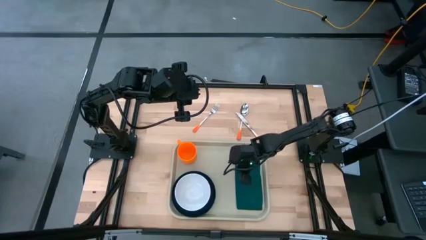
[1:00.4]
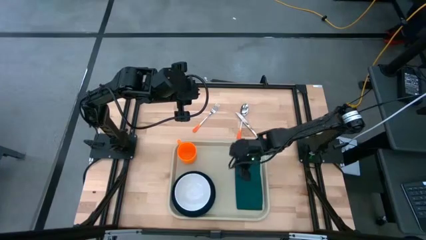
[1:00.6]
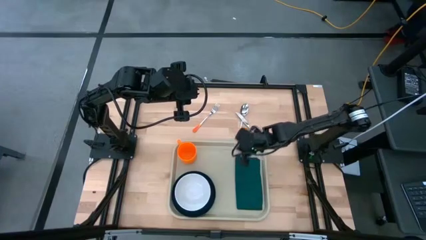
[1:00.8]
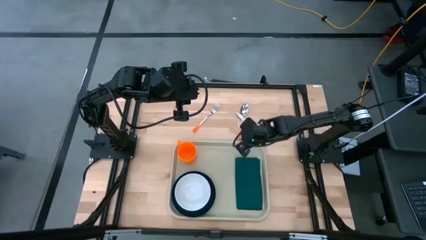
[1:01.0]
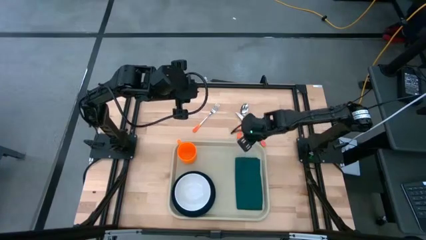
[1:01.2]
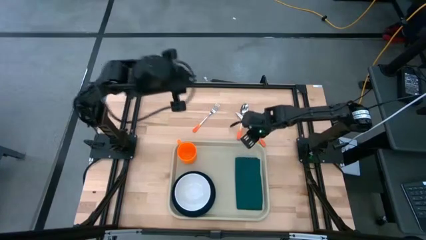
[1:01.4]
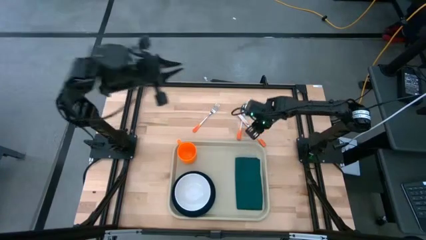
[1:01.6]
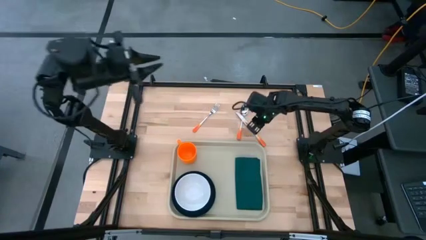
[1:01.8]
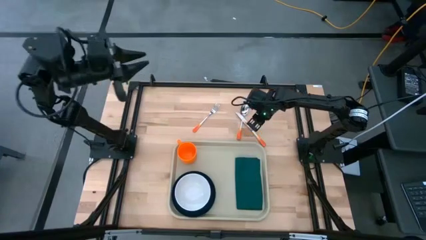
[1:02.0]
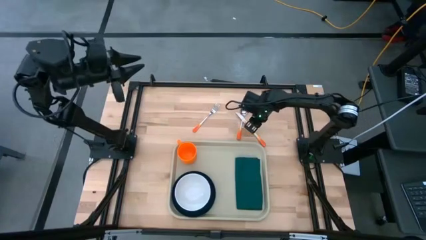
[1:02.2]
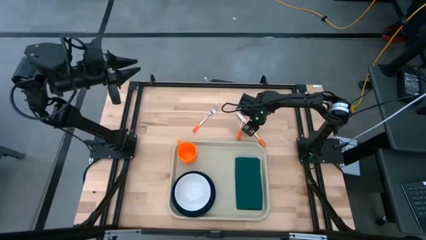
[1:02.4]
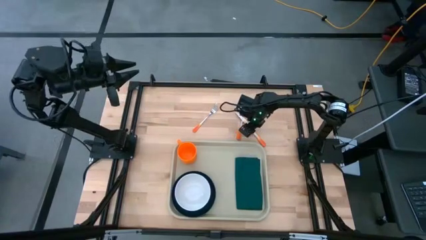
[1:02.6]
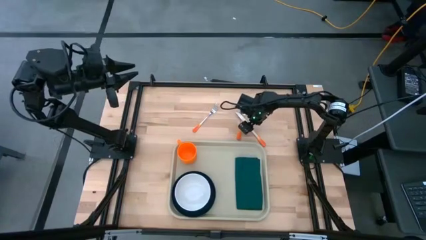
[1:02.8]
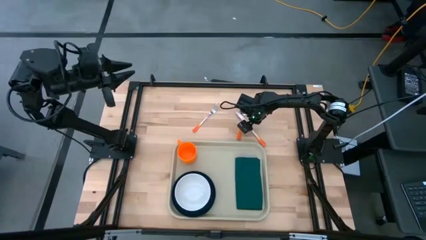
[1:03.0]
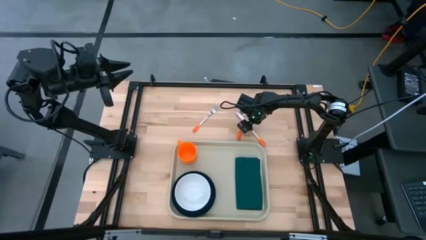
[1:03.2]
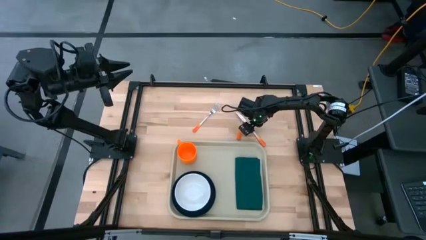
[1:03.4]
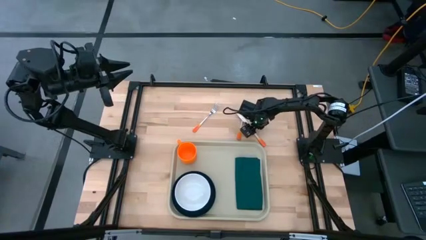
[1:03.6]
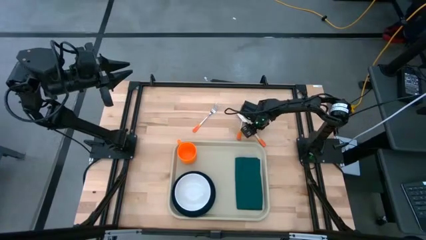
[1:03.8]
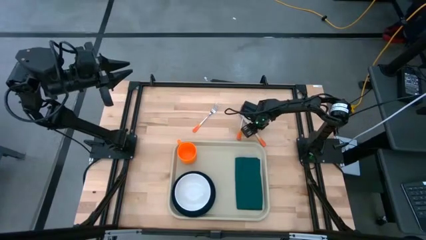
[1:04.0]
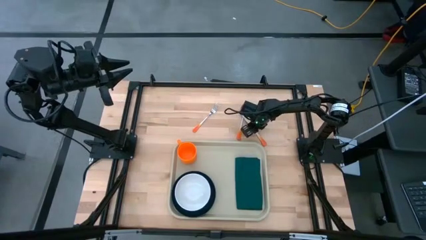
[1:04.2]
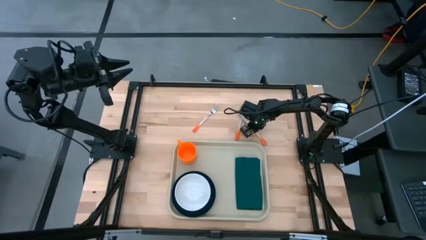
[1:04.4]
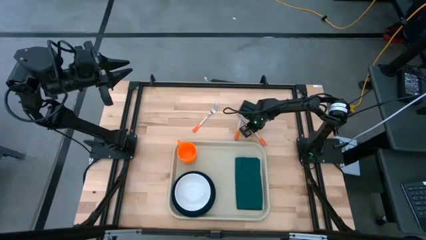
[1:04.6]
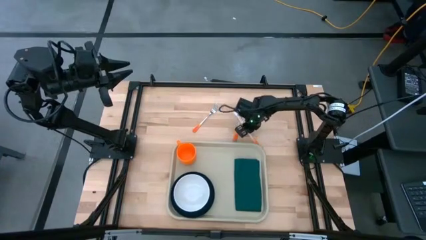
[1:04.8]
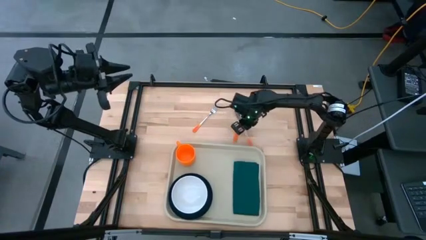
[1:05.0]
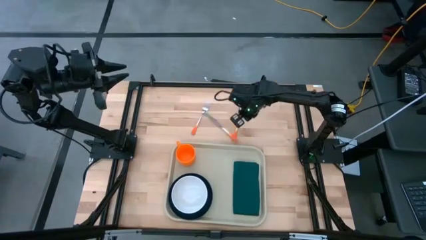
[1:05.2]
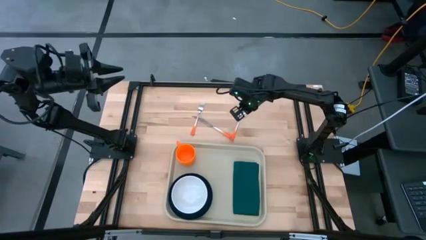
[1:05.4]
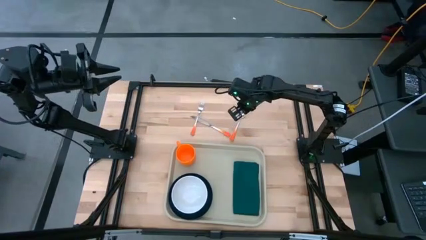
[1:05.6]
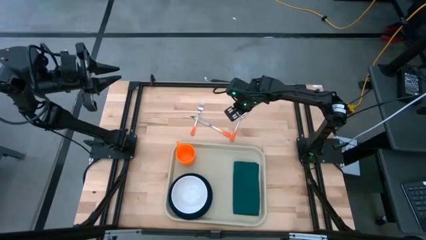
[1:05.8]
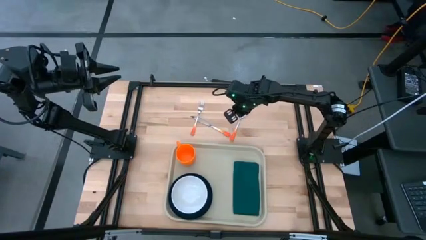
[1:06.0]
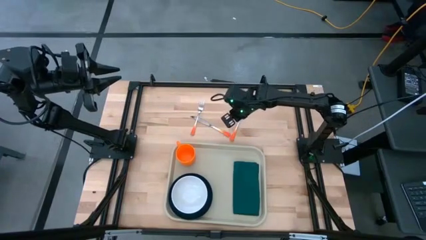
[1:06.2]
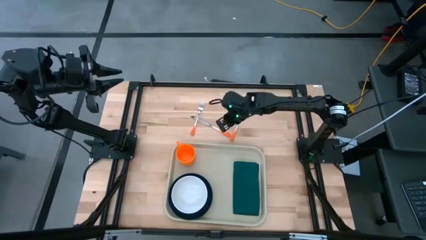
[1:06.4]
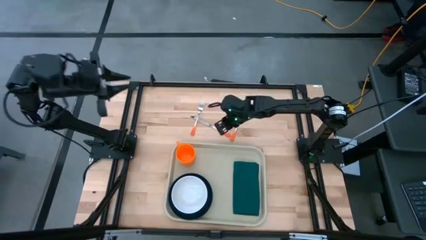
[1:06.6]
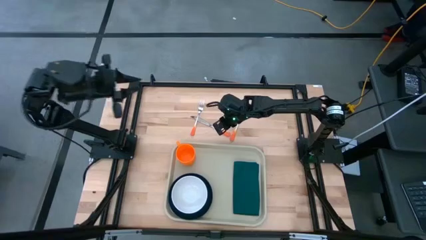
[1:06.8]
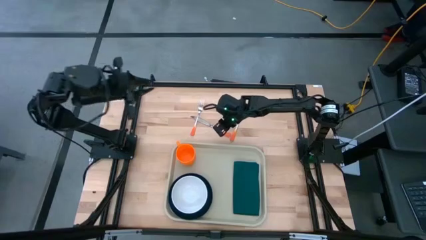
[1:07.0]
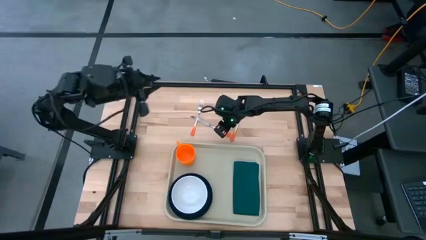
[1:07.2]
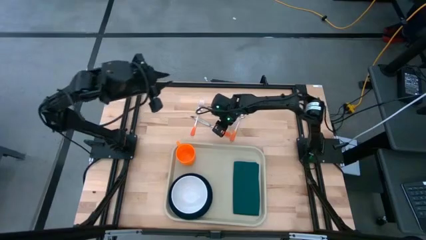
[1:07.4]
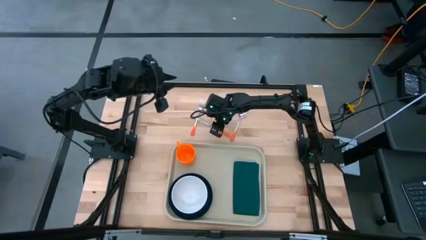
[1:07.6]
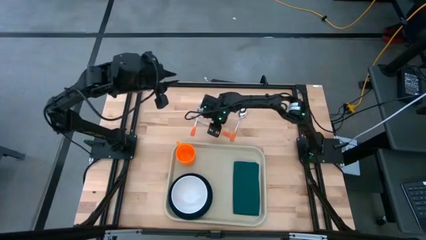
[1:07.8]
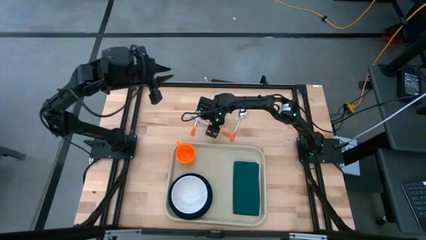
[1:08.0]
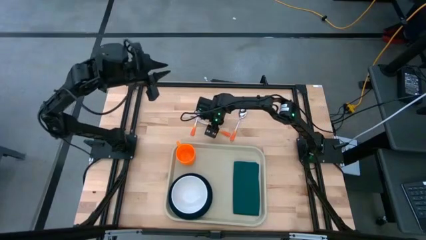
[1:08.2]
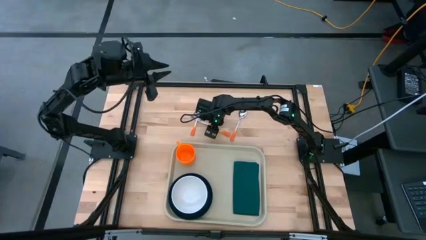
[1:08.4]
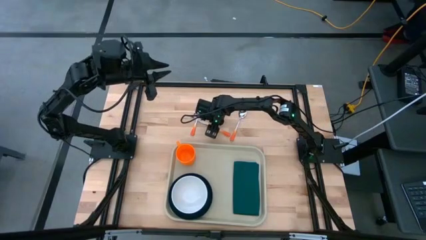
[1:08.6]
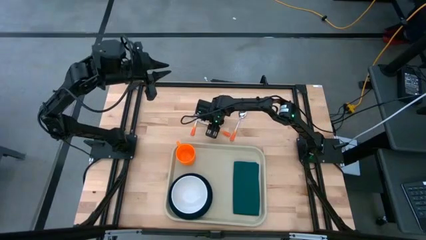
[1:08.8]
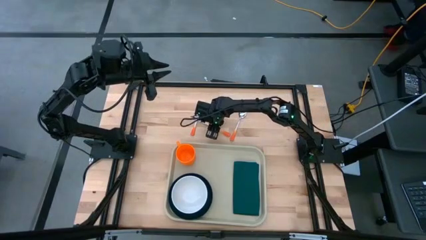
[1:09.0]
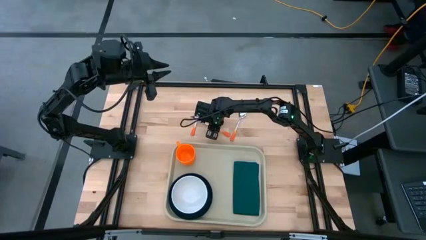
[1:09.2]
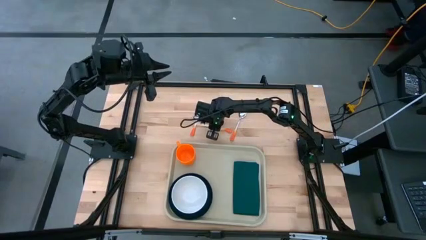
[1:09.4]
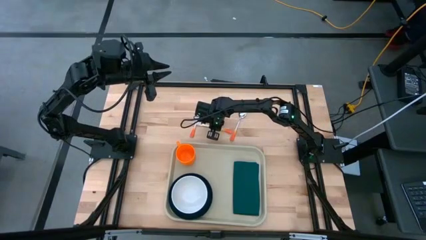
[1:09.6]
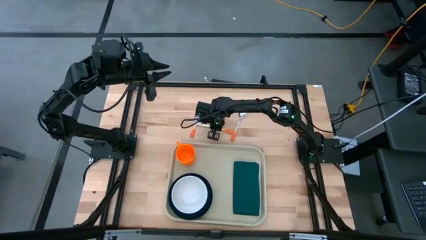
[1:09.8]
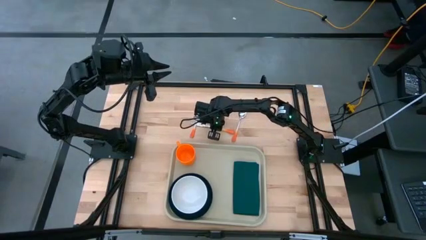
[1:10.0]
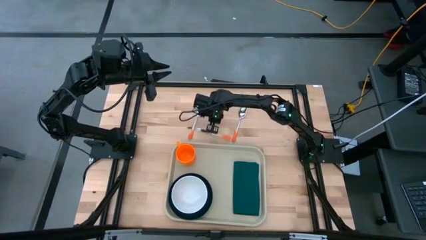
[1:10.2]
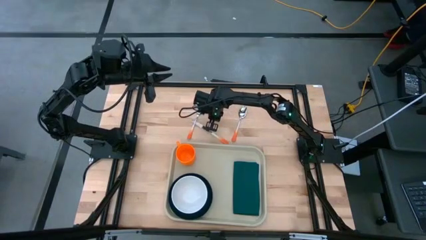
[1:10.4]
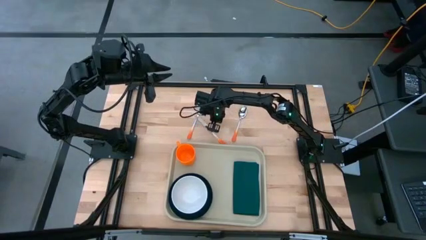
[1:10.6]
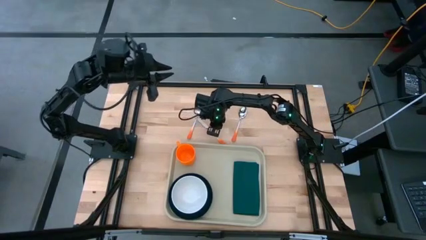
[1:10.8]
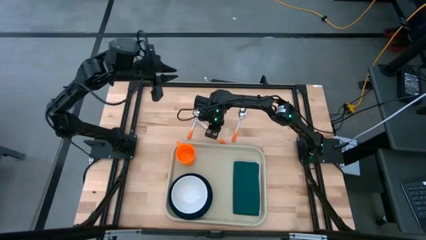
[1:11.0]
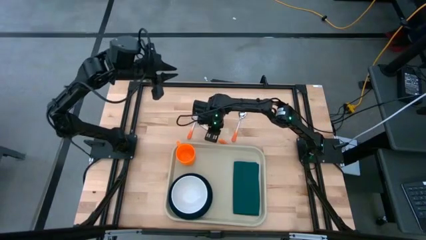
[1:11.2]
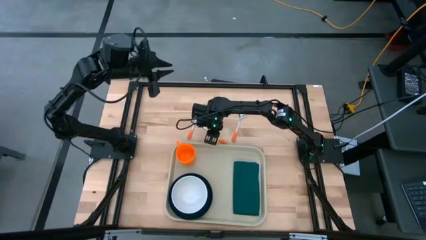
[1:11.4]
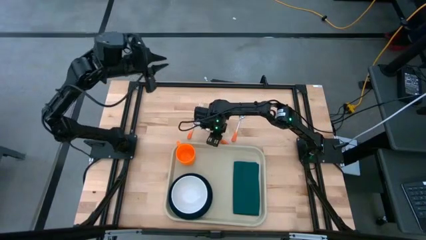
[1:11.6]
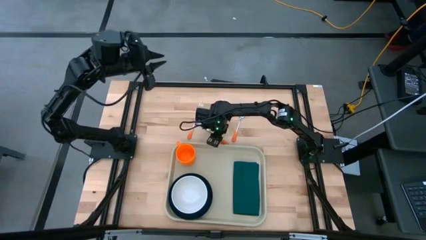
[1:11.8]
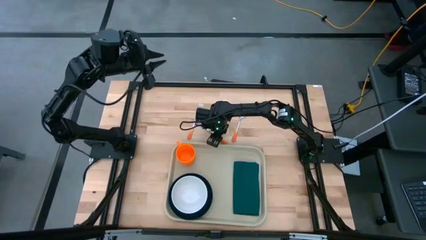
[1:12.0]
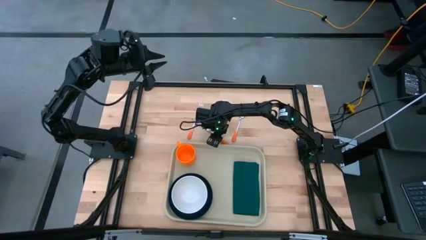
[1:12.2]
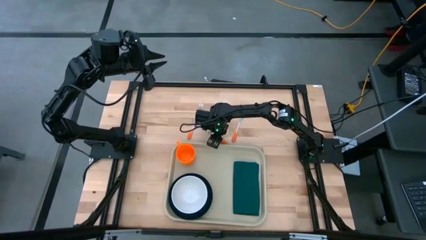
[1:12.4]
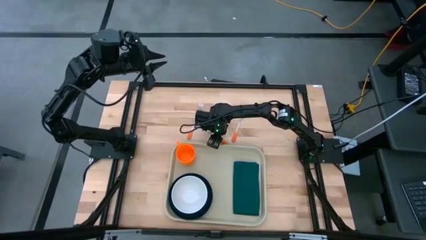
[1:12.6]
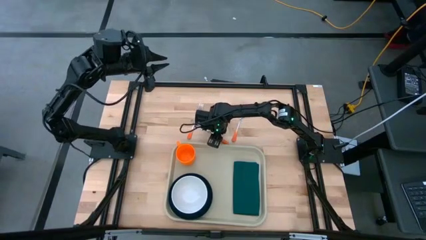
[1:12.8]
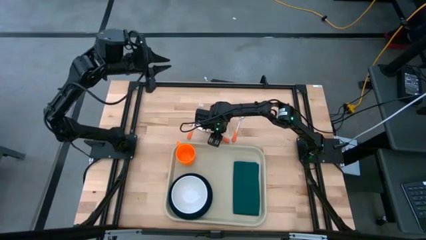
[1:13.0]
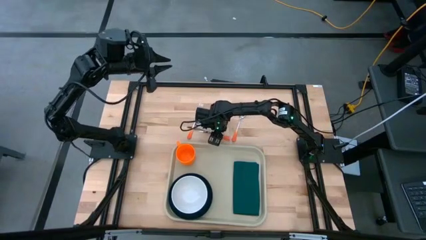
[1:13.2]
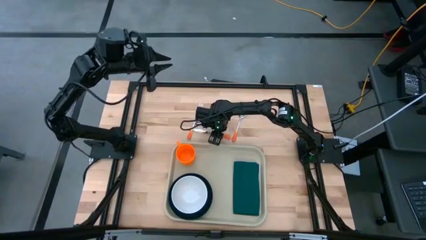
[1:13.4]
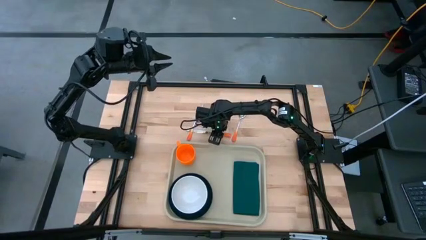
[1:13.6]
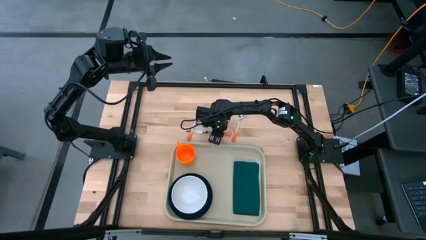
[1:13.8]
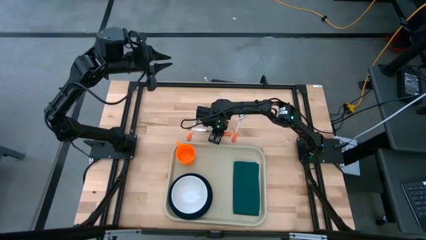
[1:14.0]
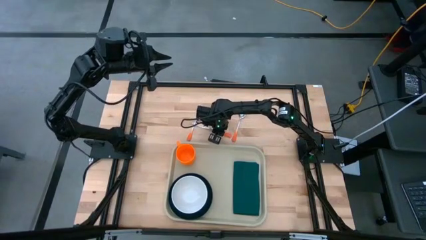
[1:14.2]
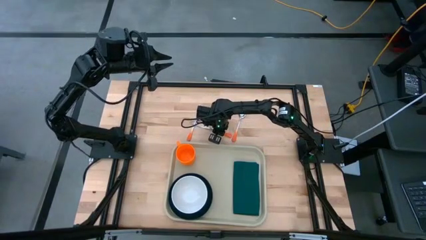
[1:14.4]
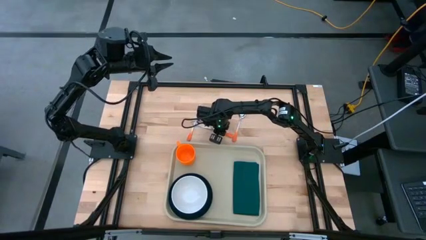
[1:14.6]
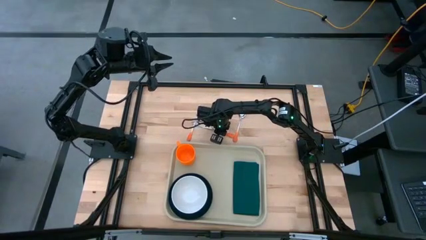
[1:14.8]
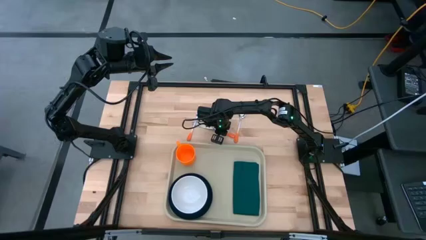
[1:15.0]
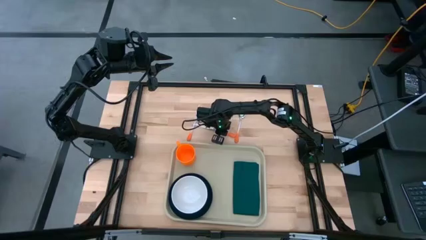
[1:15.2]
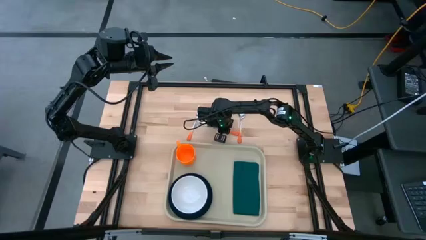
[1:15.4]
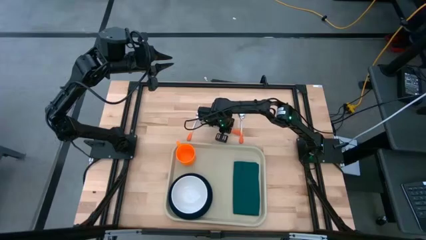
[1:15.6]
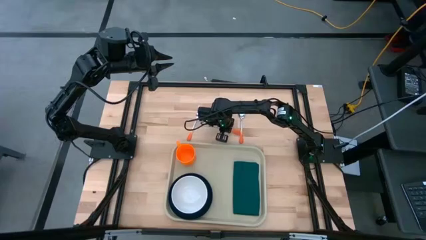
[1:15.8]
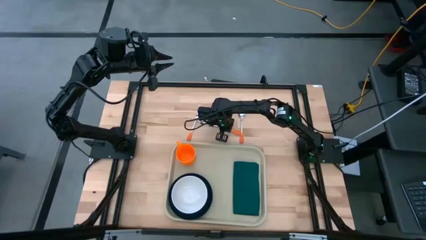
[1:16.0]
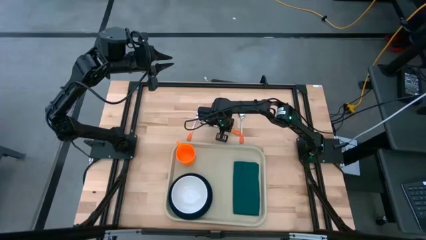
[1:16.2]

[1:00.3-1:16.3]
Task: Set up tray
Put the knife on the napkin
